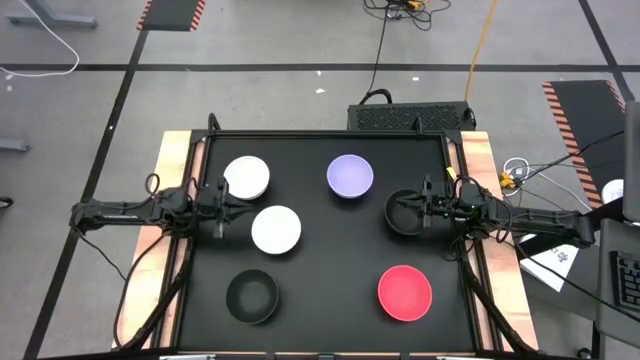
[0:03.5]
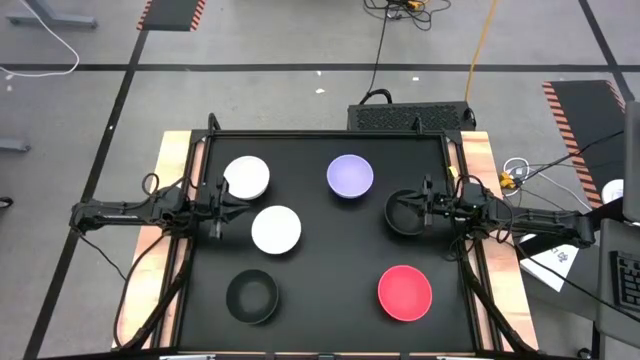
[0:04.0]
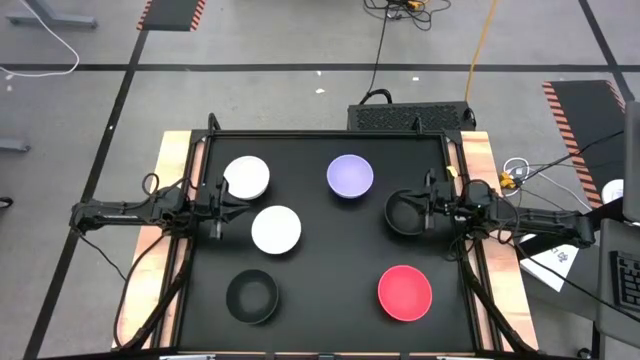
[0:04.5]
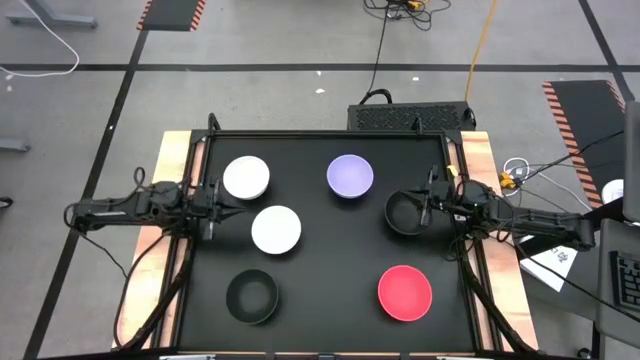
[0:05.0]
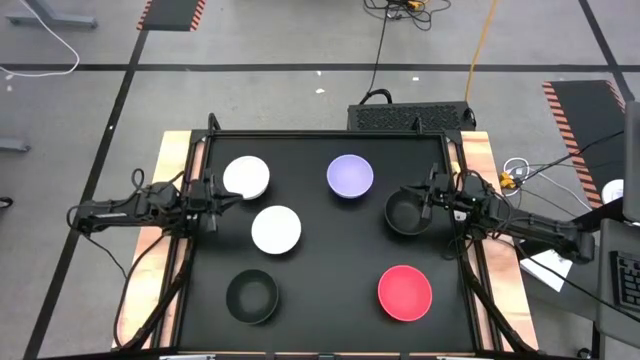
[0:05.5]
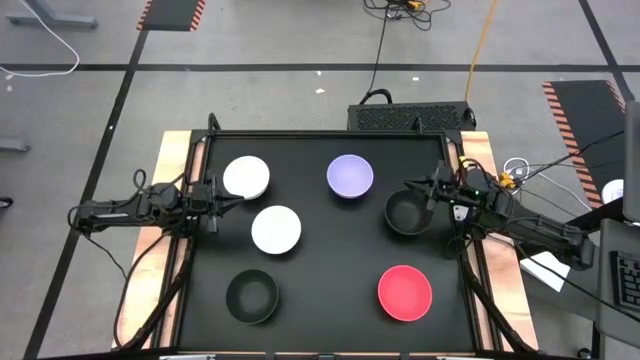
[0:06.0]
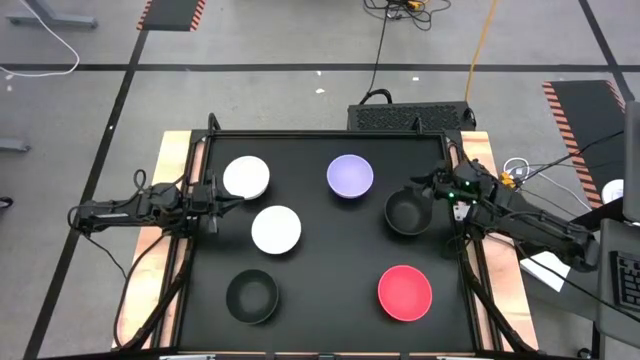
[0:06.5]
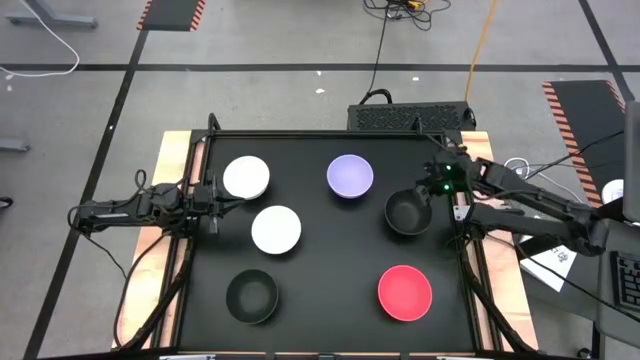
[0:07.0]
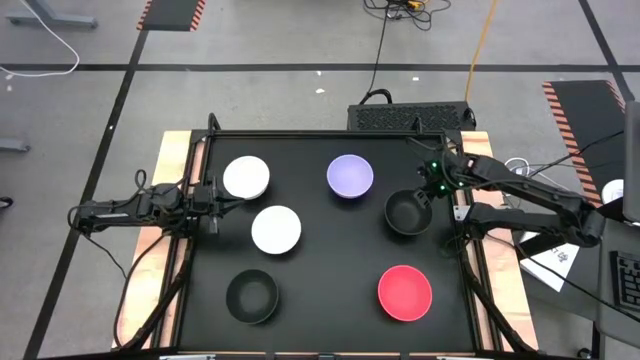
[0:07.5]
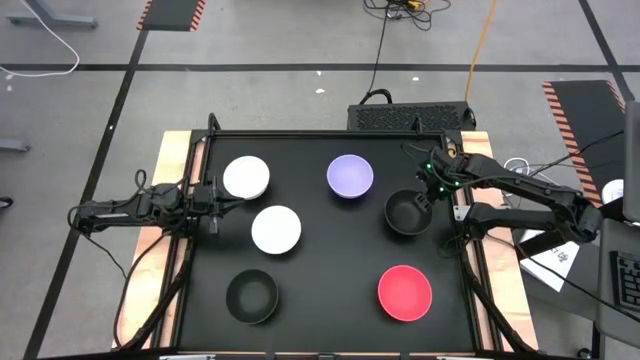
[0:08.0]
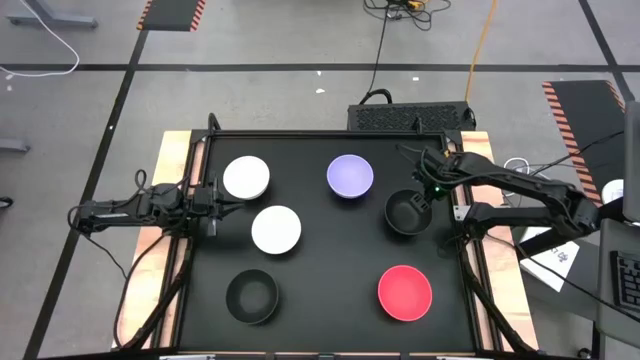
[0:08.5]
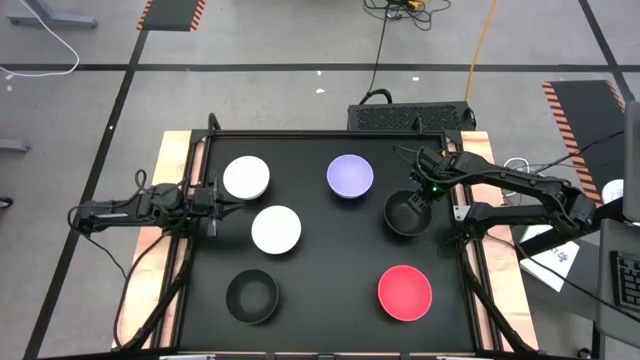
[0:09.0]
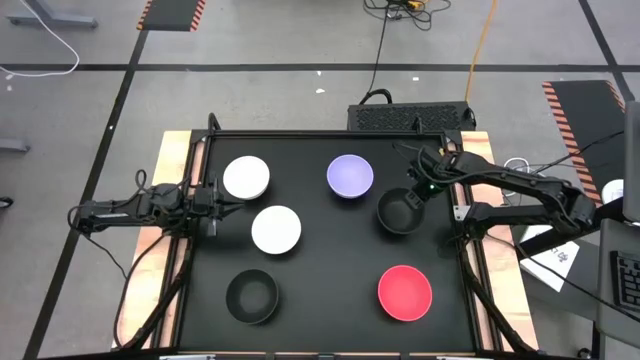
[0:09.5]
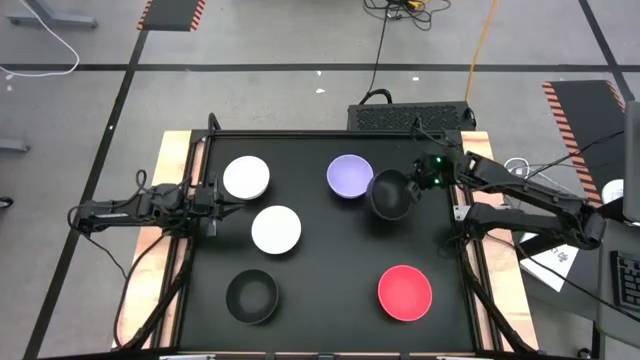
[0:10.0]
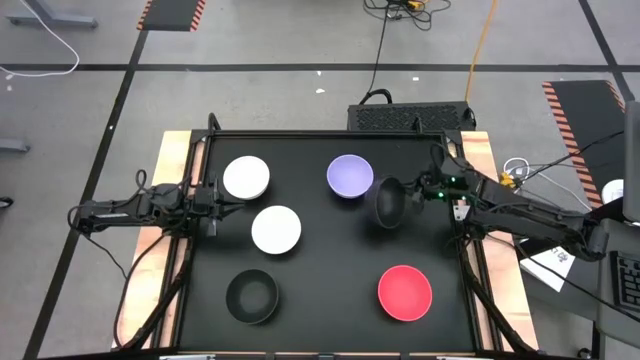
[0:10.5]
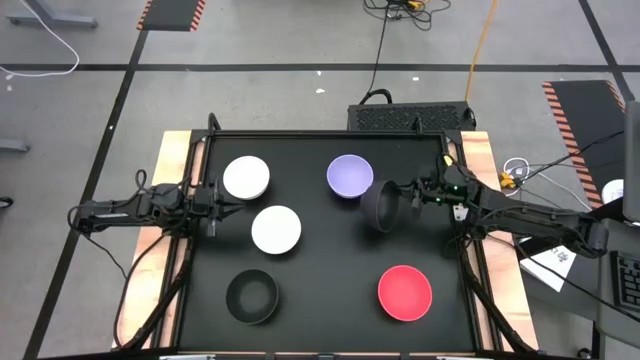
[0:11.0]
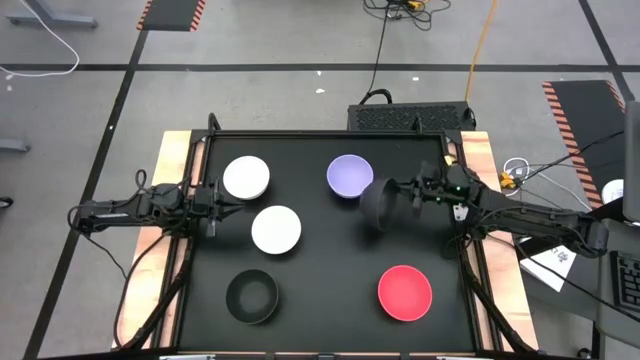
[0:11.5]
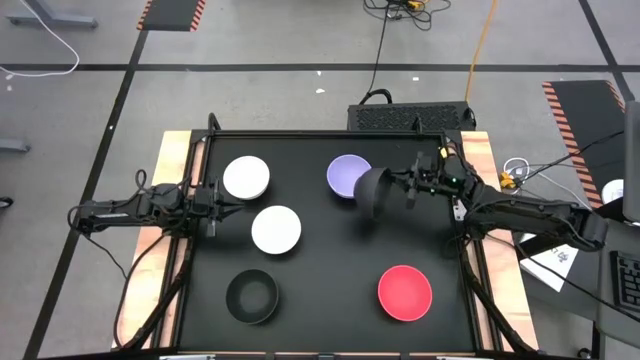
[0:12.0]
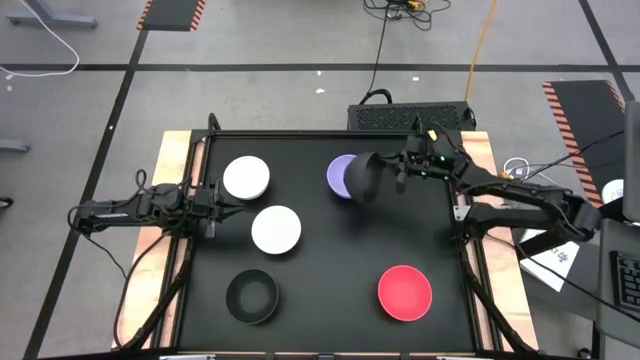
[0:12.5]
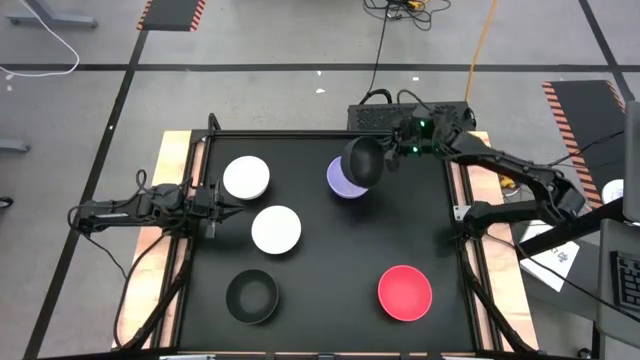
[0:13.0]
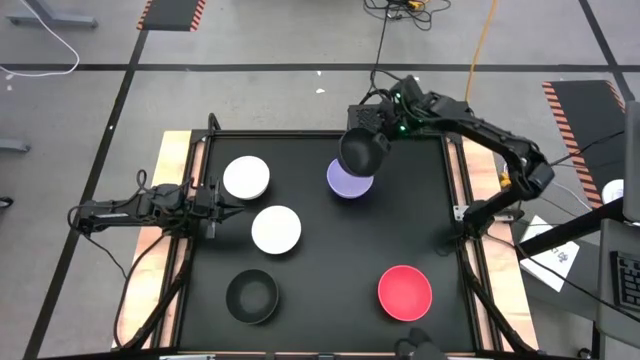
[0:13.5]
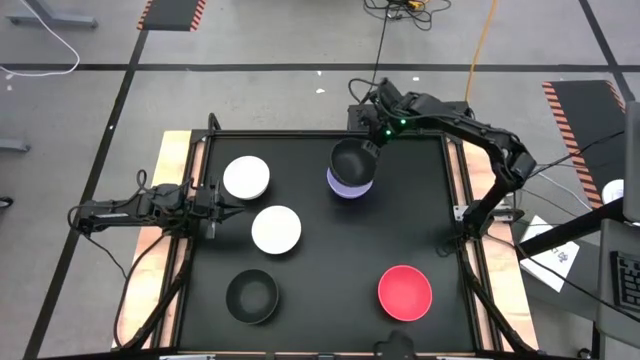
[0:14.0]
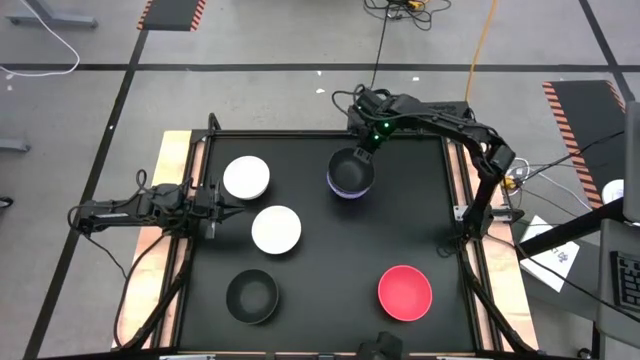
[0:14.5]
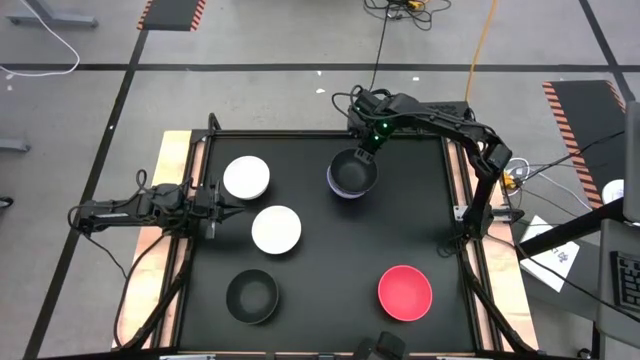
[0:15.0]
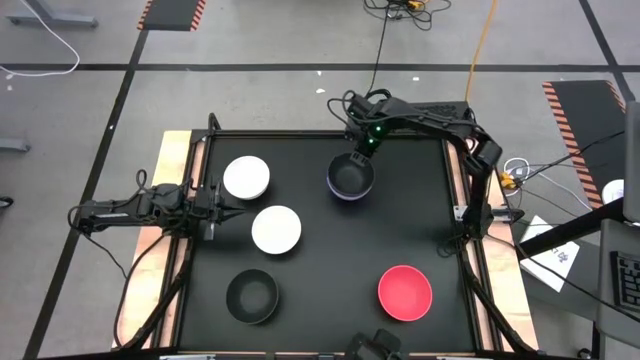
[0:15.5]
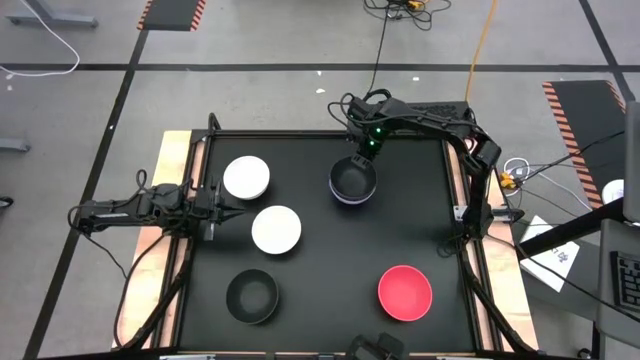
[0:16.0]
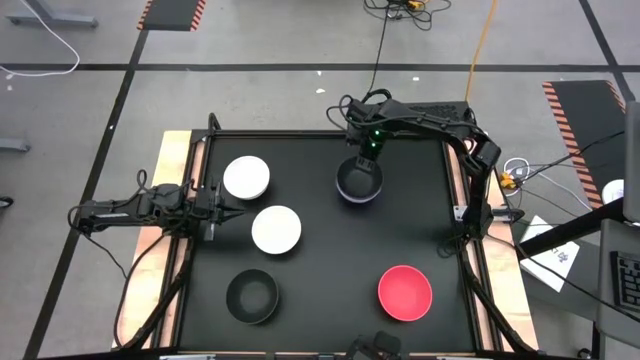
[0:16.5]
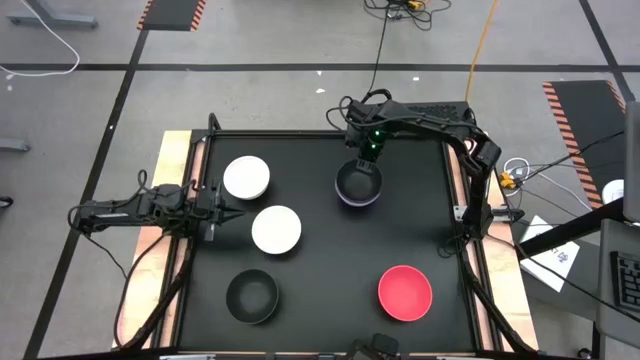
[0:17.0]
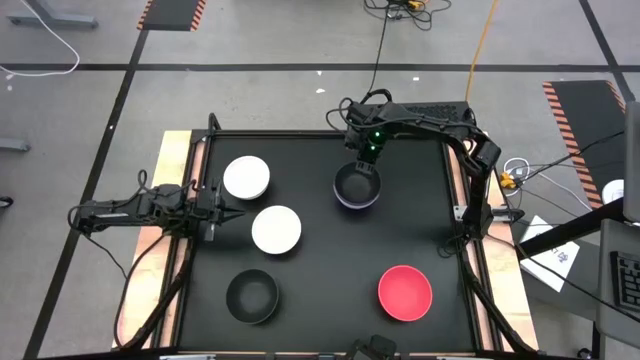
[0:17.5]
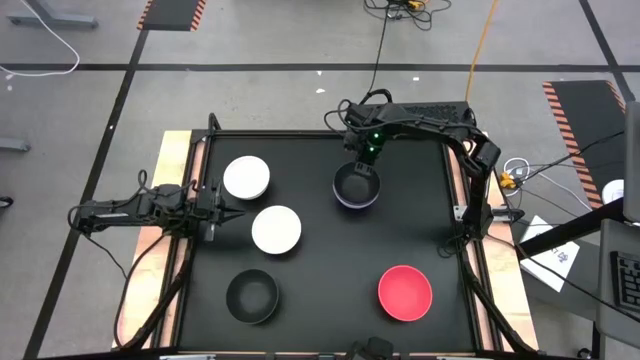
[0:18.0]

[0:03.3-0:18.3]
Task: Nest bowls inside each other
Stack the top black bowl on top of the purple bowl

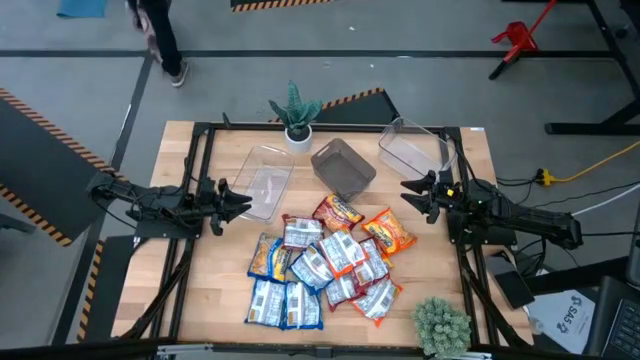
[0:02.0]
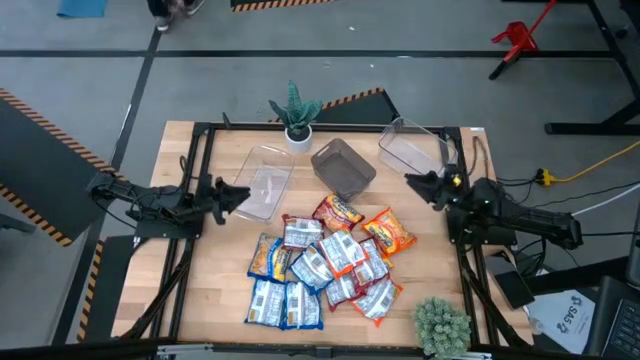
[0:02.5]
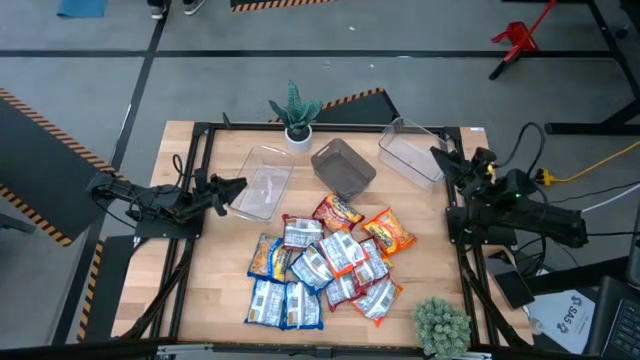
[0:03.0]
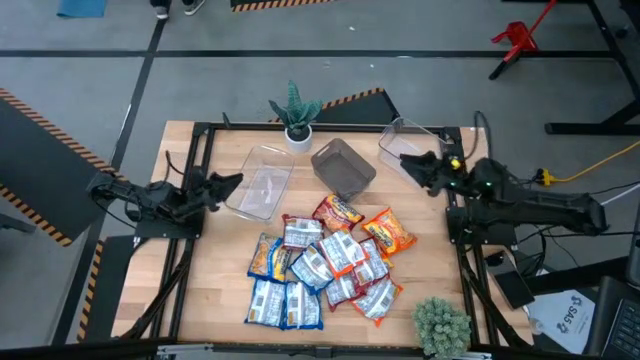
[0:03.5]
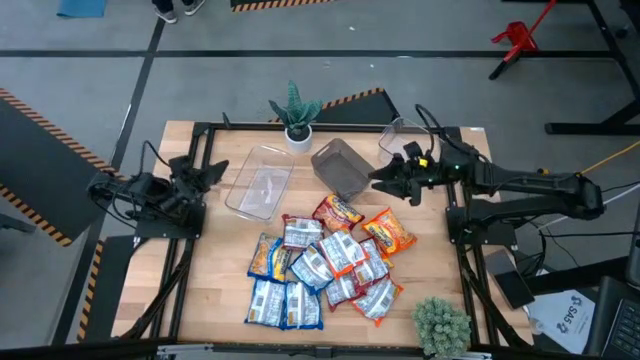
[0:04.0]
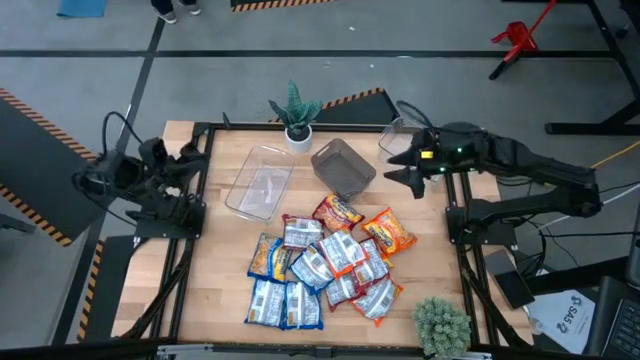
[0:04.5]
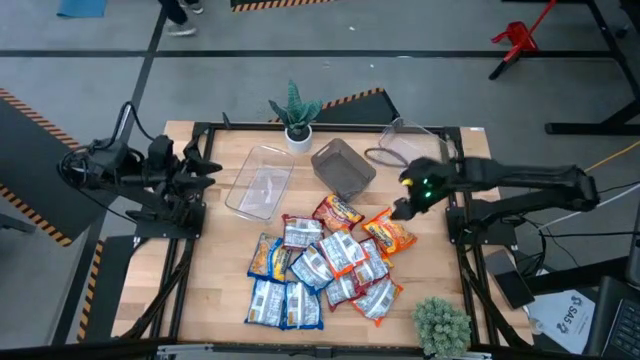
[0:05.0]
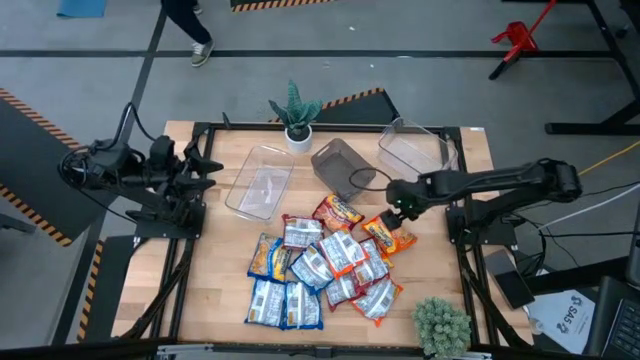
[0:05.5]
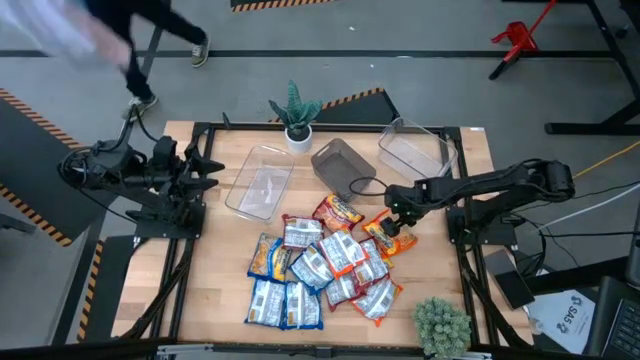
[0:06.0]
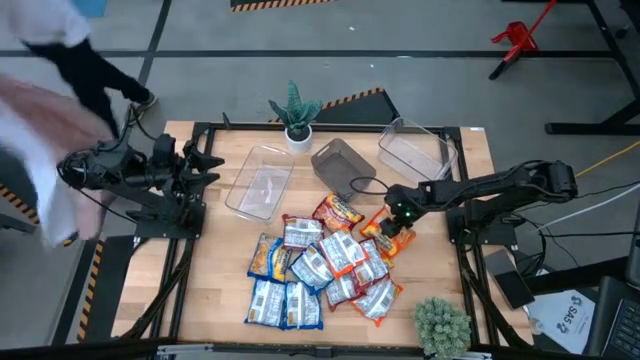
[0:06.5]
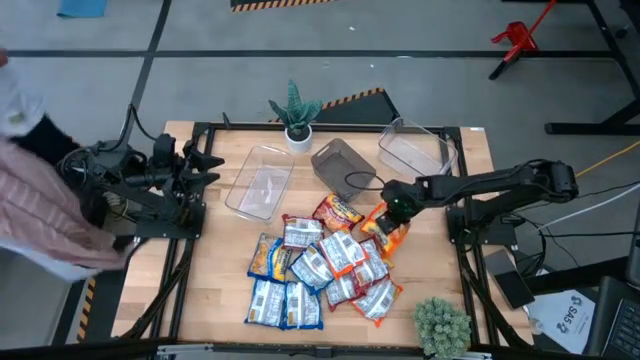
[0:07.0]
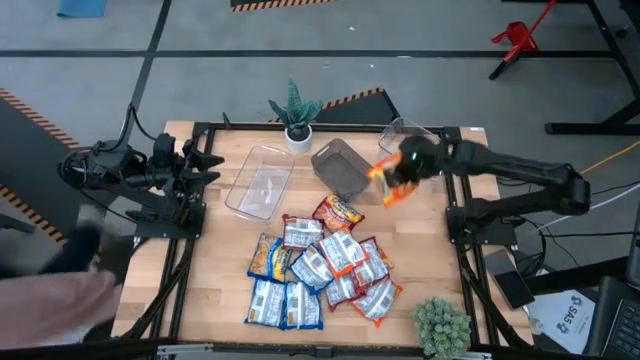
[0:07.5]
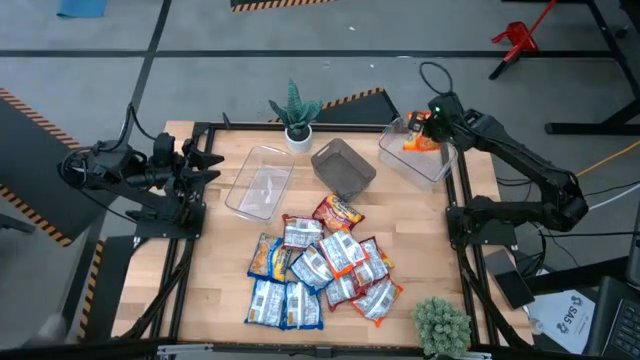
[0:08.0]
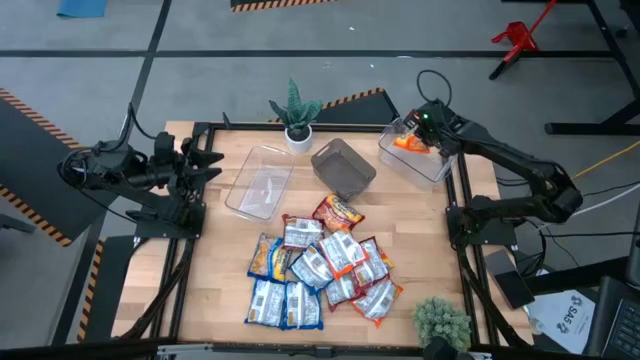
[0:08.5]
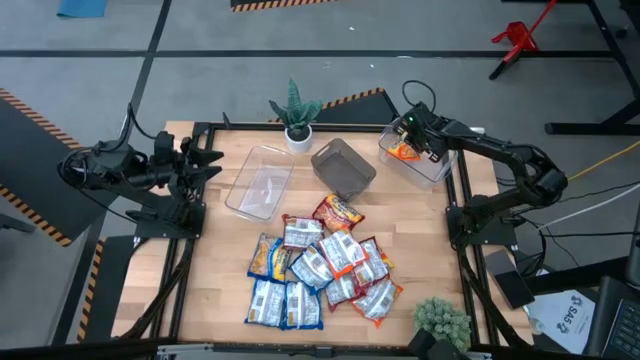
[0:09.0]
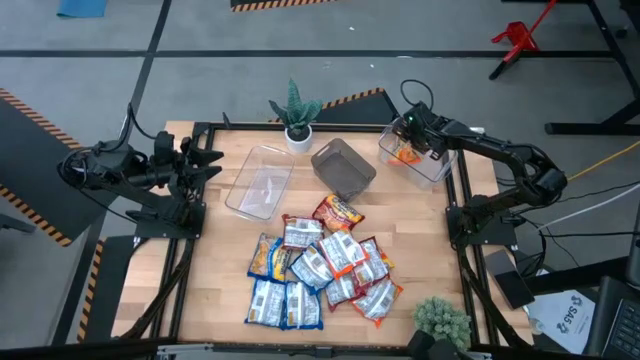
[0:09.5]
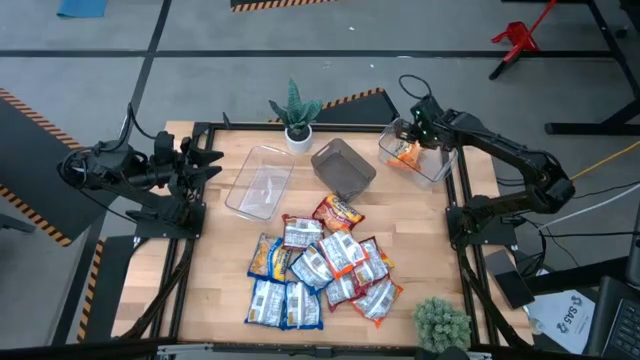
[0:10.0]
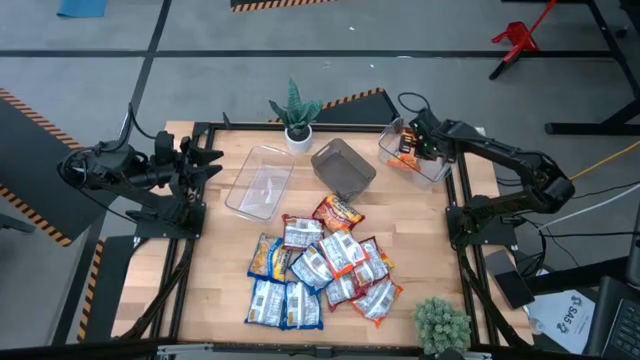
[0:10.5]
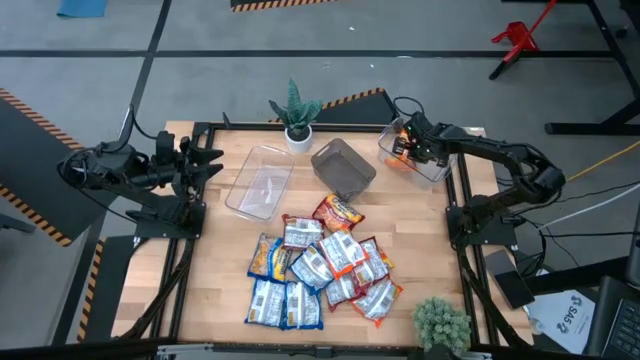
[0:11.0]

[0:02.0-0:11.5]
Task: Sort Maruchan noodles
Put the orange noodle pack into the right transparent bin
